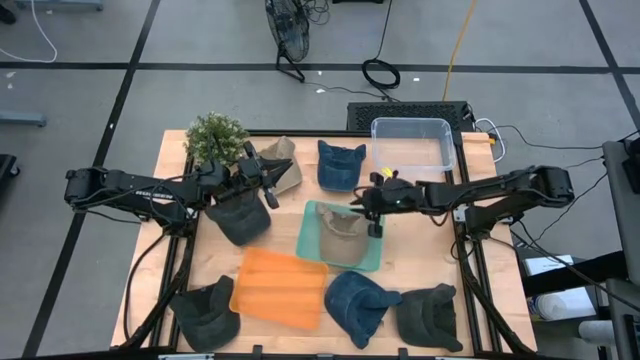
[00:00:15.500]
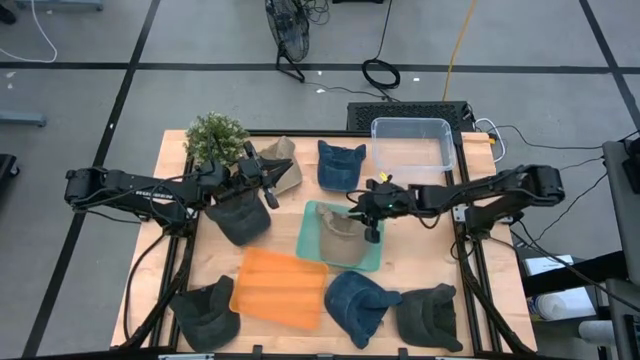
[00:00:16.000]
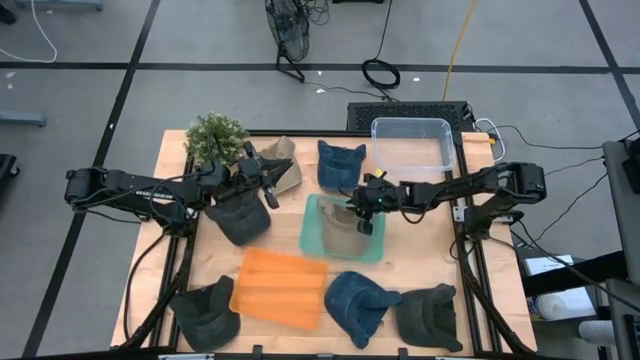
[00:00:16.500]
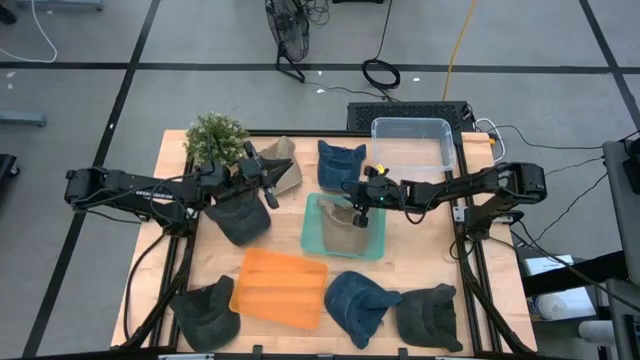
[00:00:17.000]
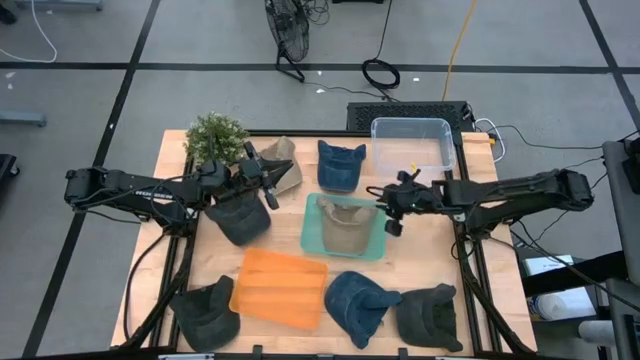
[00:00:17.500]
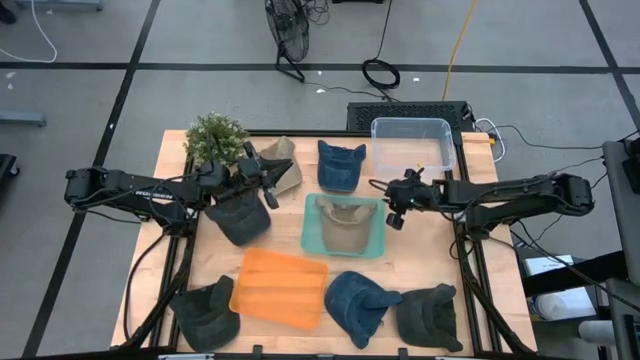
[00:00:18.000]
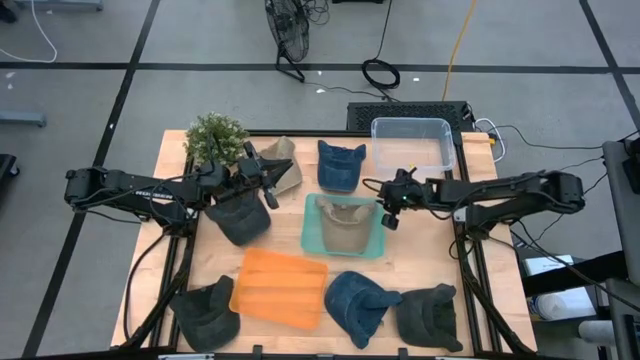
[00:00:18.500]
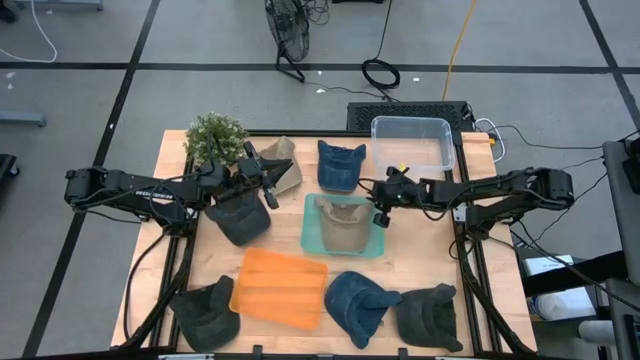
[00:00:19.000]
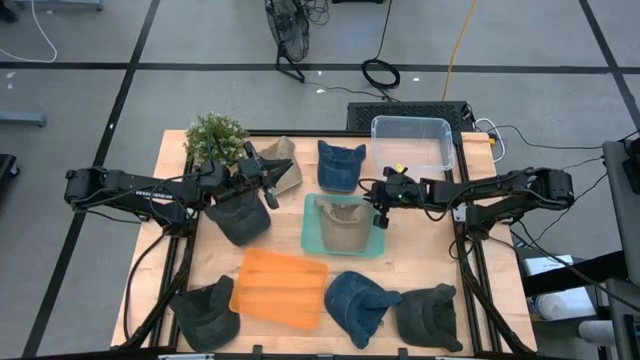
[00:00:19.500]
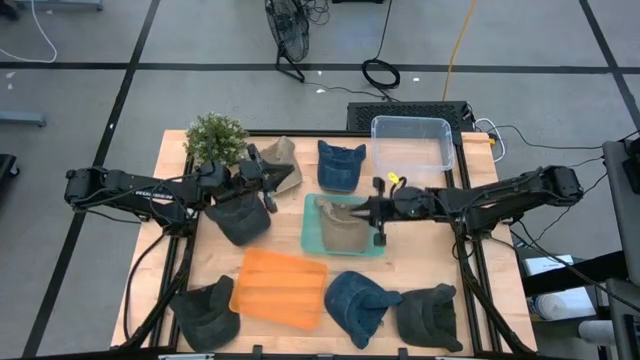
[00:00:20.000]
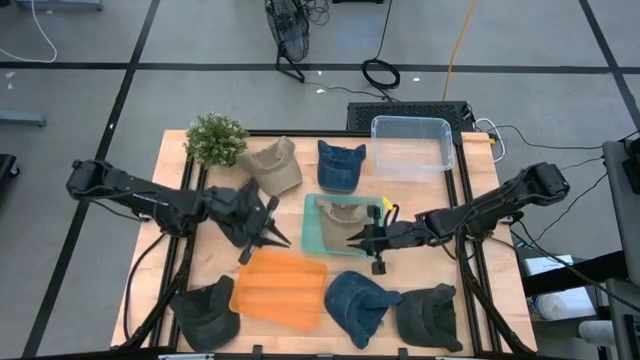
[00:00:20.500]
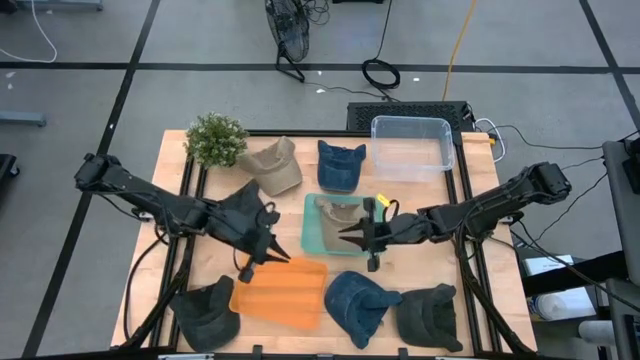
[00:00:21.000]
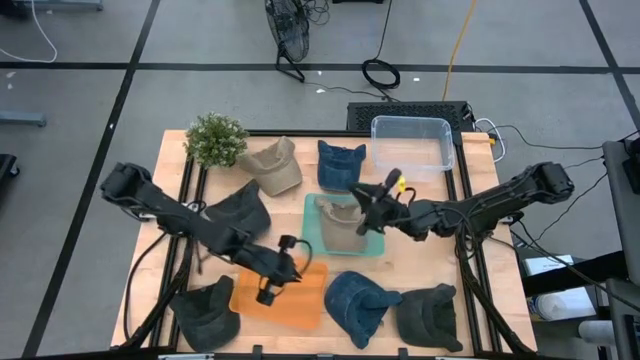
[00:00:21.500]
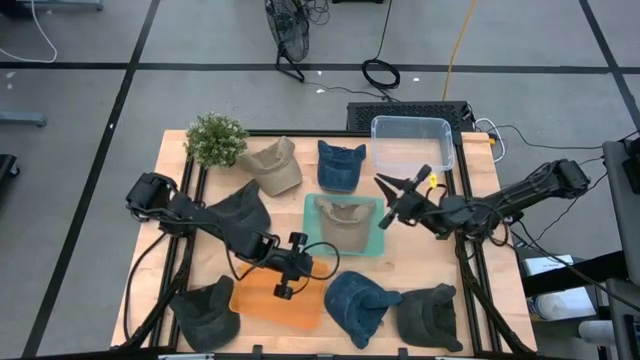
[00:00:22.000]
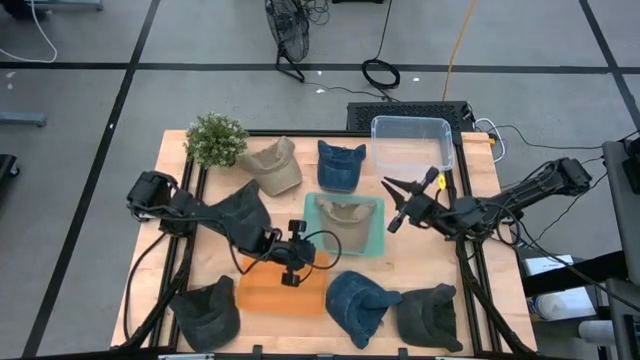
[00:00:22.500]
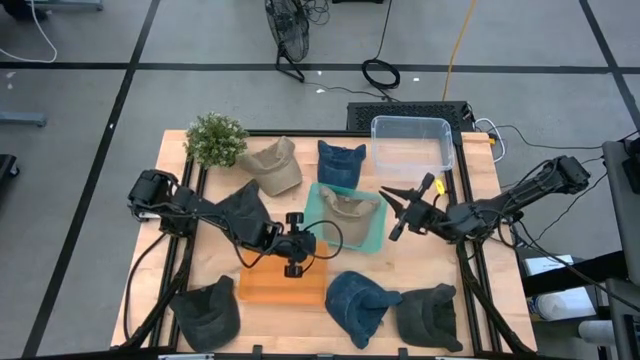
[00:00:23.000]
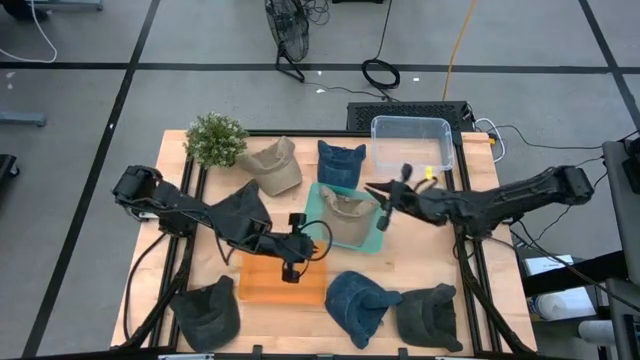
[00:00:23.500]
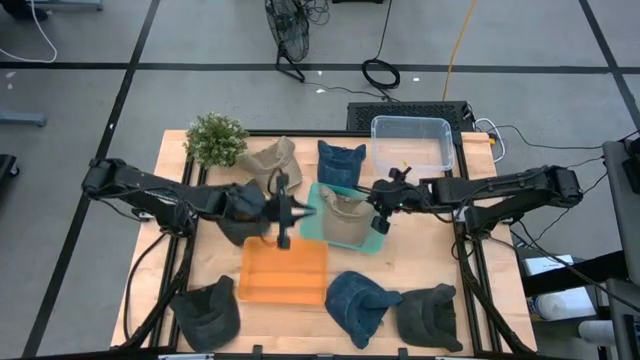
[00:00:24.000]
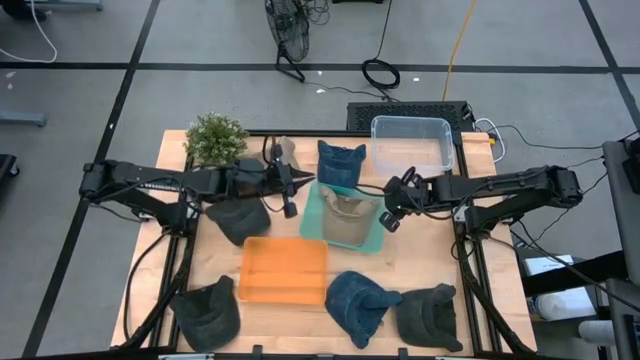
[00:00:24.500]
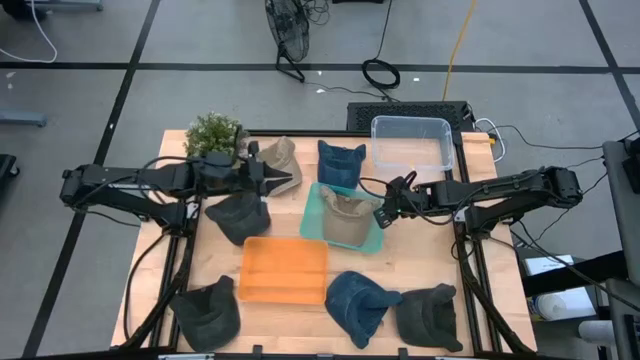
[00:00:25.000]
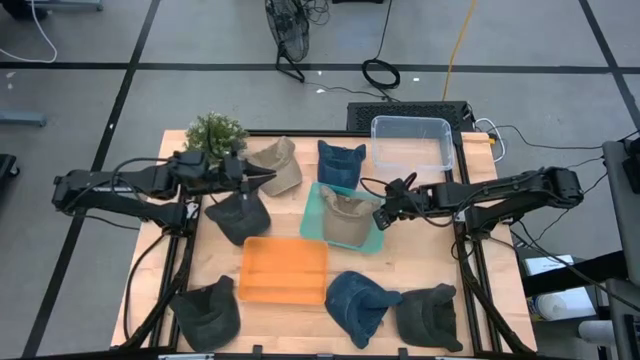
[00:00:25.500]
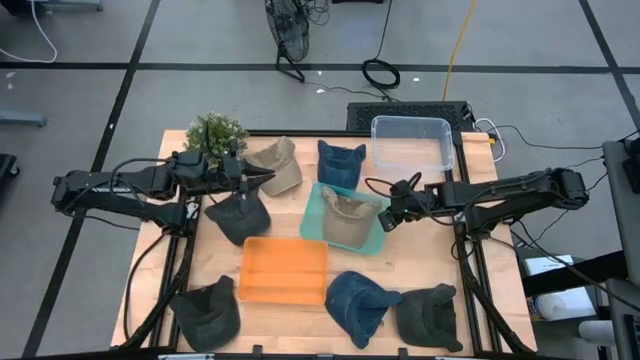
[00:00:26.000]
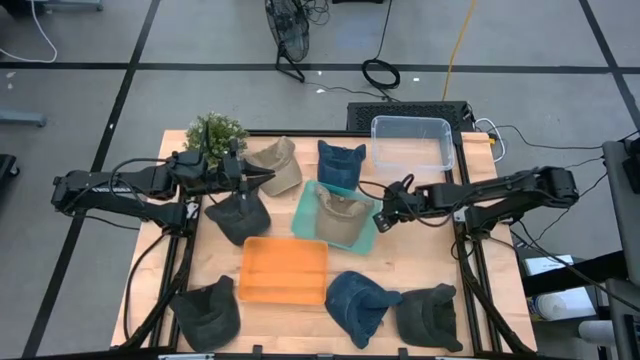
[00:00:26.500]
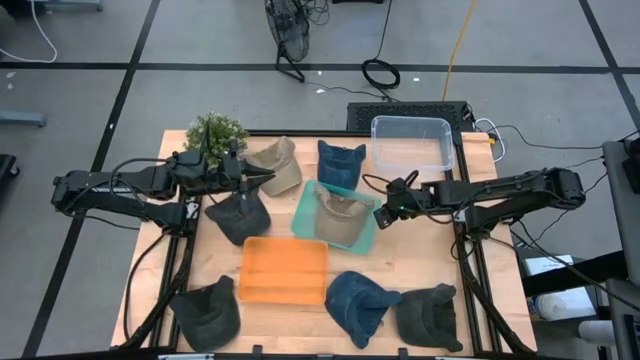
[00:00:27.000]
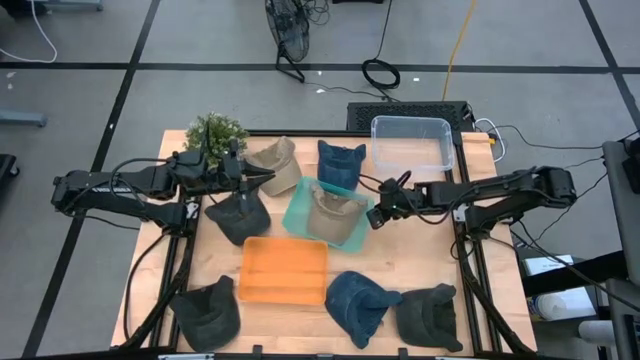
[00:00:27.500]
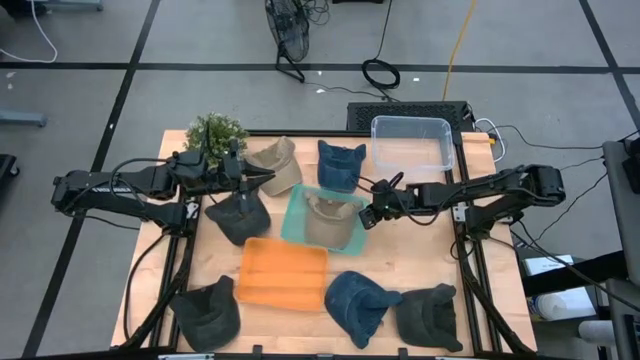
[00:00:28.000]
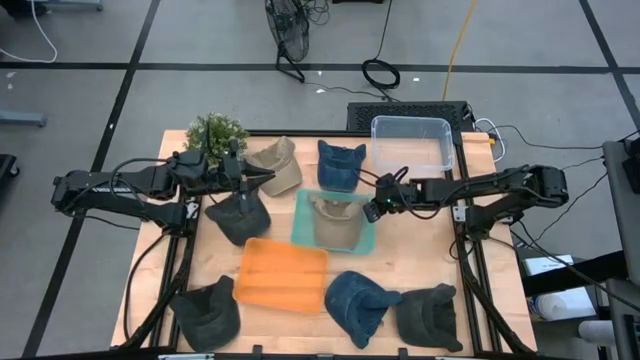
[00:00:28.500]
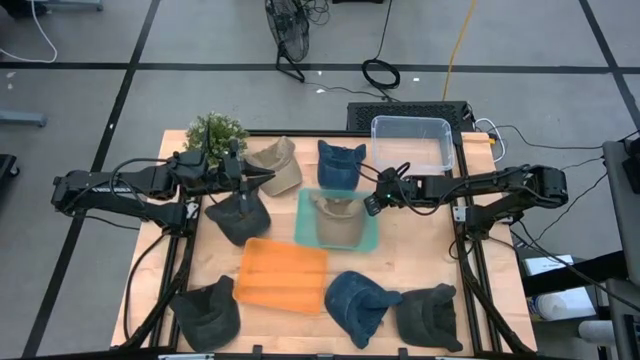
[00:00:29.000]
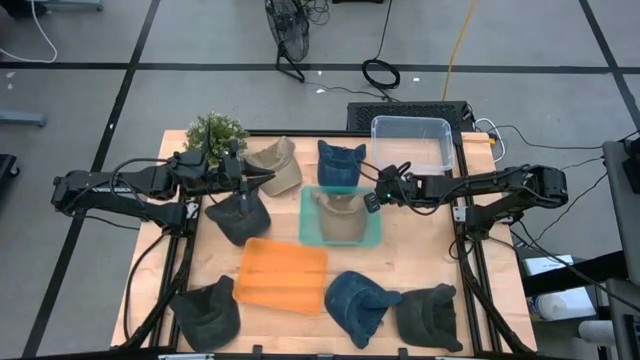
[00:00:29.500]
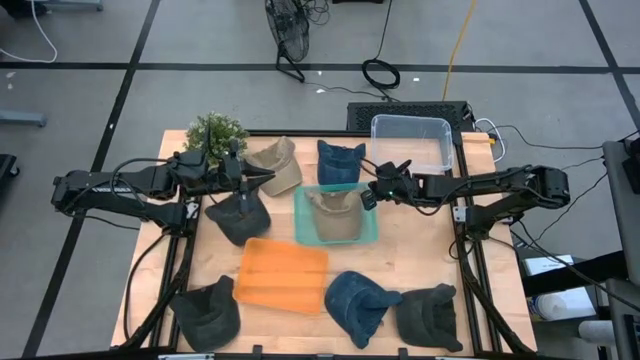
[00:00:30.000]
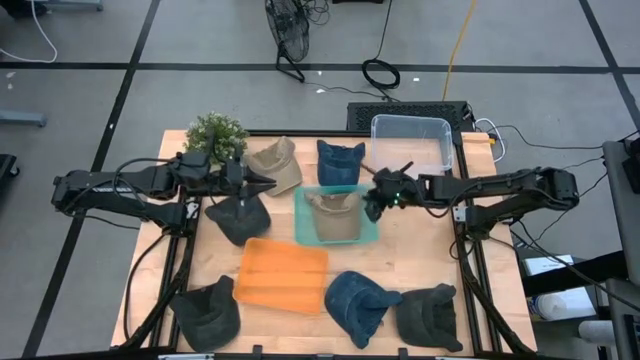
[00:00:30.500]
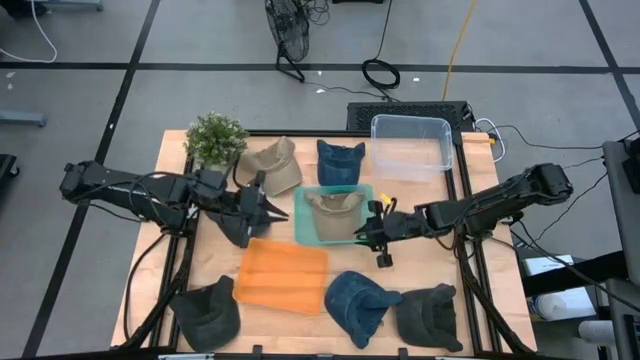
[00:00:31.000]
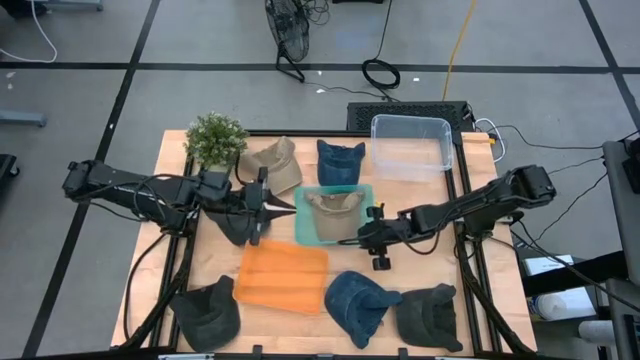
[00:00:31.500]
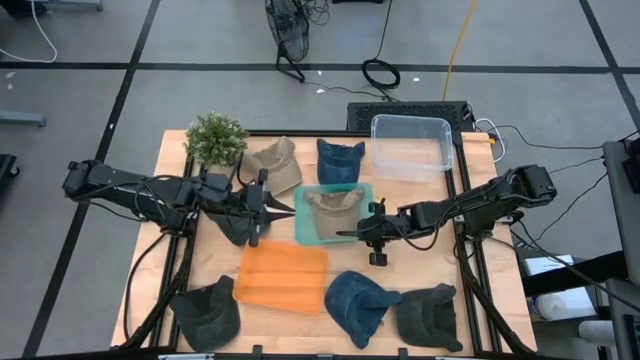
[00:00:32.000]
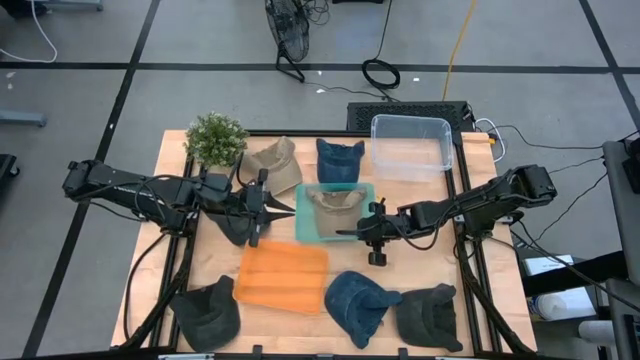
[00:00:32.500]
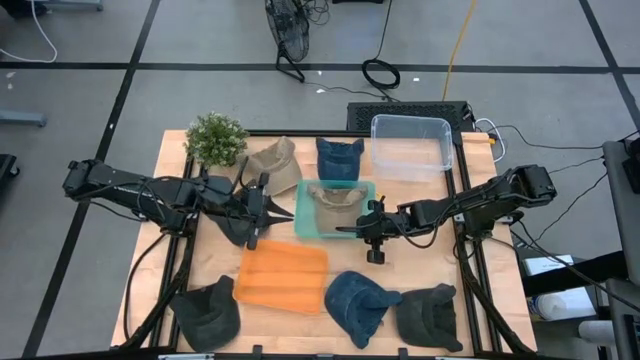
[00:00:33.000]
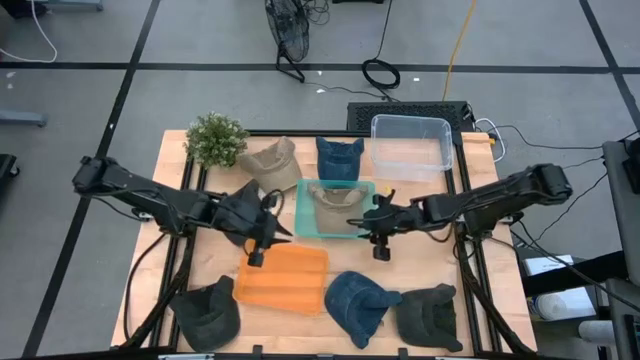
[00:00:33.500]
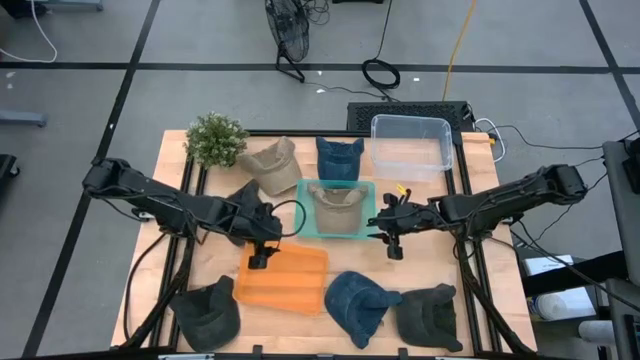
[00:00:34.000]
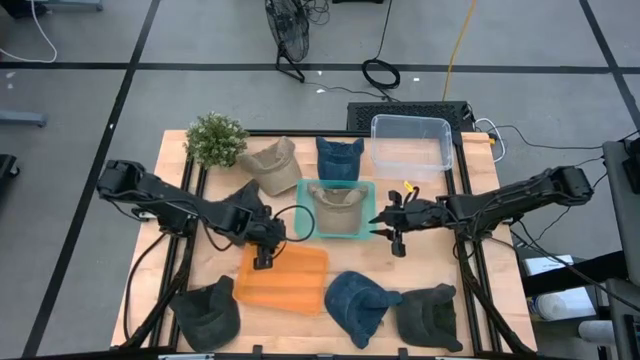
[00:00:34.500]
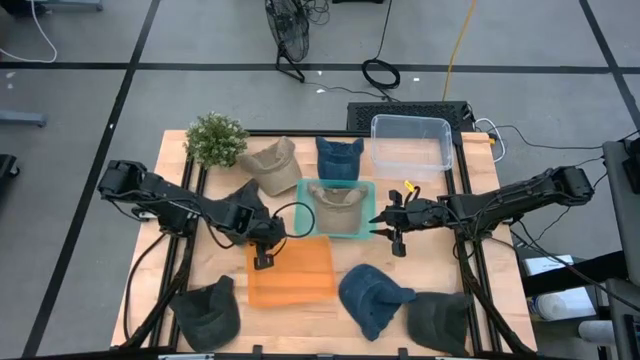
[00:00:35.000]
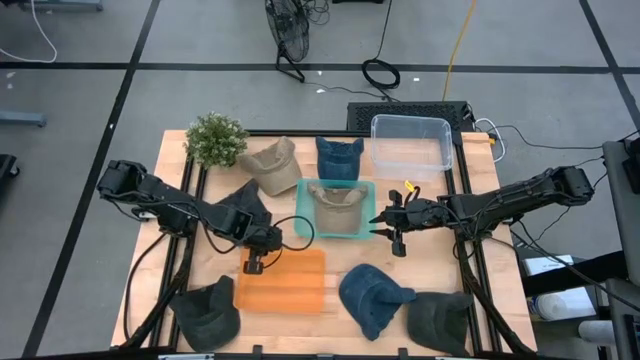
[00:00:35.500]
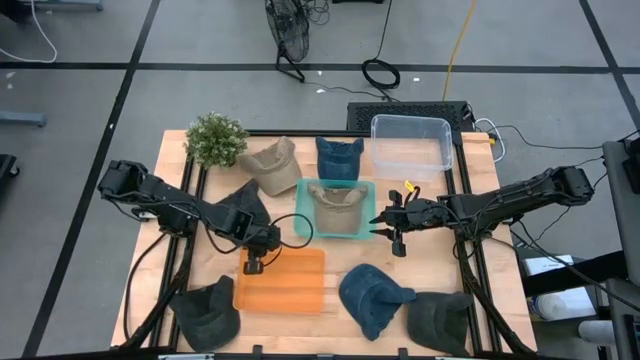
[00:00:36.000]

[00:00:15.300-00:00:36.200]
Task: Pick & Place hat
Adjust the bins on the table

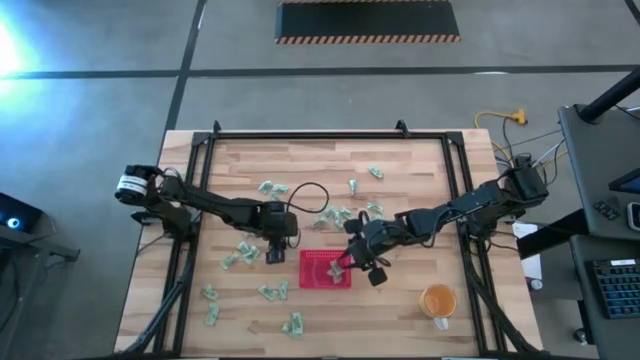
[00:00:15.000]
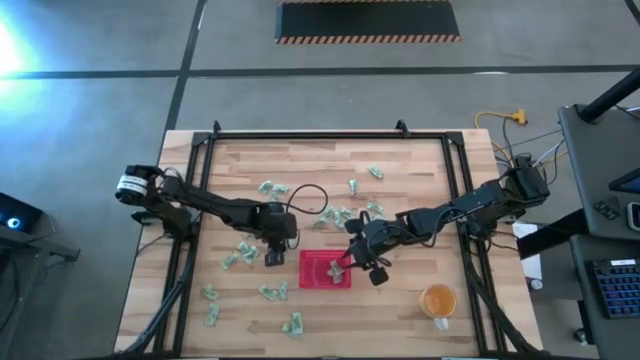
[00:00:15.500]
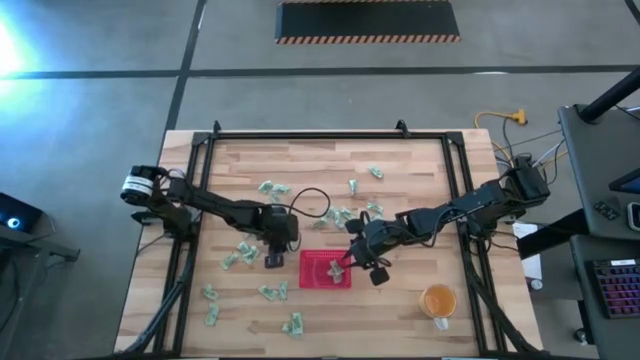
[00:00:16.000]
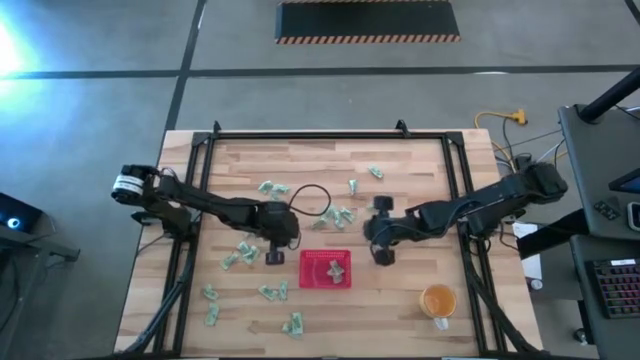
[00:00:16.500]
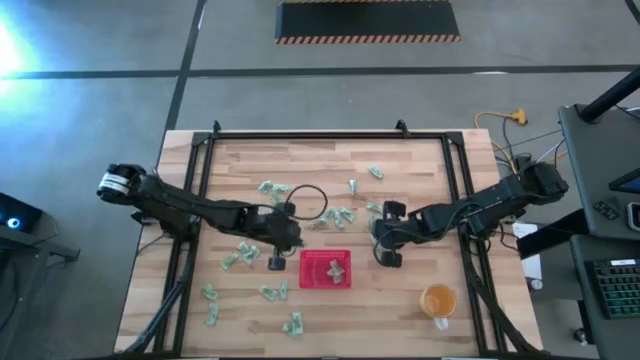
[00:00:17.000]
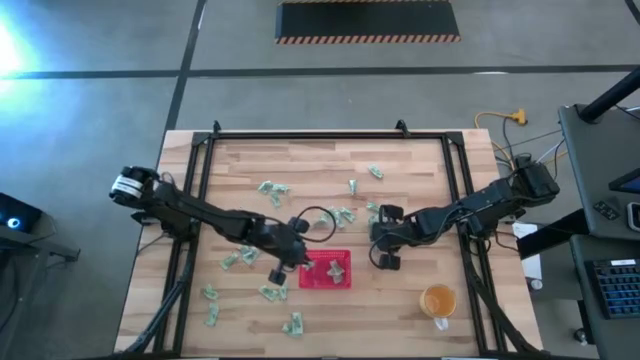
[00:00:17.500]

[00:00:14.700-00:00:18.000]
Task: Pick and place Stevia / Truvia into bins
Put the white stevia packet into the red bin
